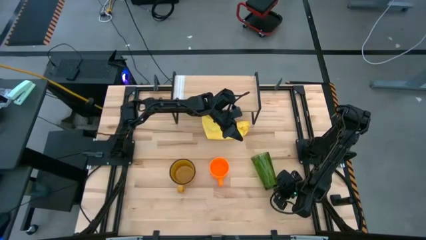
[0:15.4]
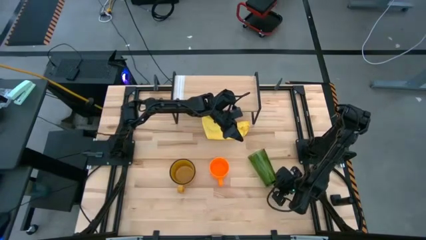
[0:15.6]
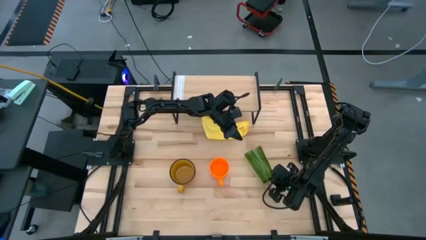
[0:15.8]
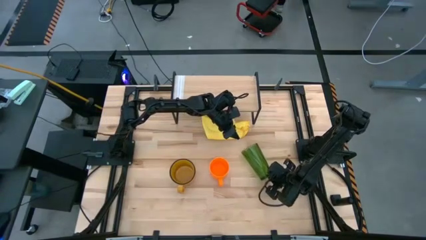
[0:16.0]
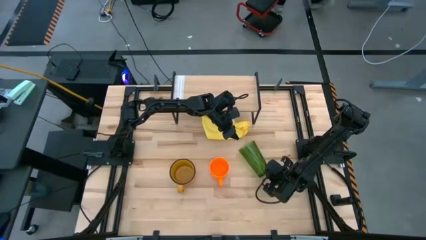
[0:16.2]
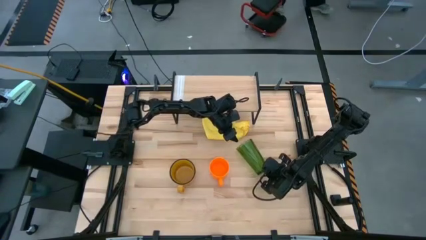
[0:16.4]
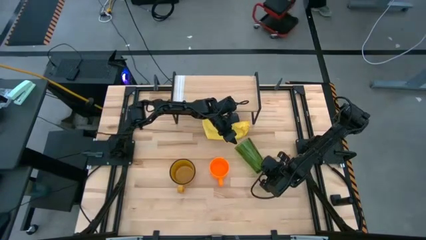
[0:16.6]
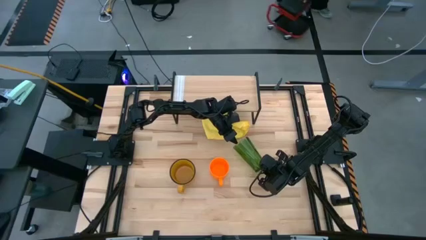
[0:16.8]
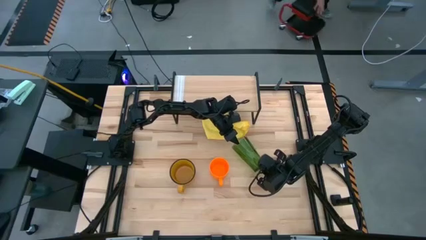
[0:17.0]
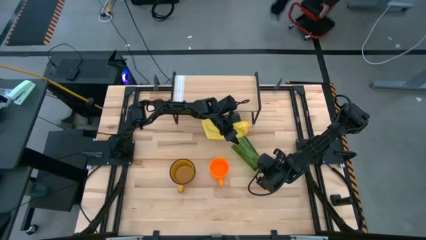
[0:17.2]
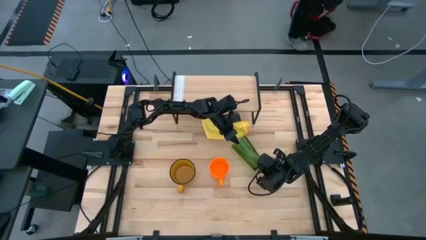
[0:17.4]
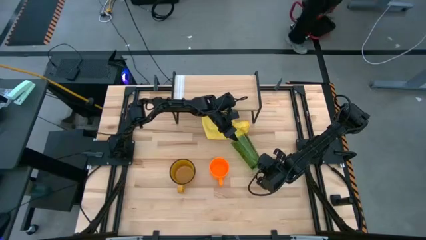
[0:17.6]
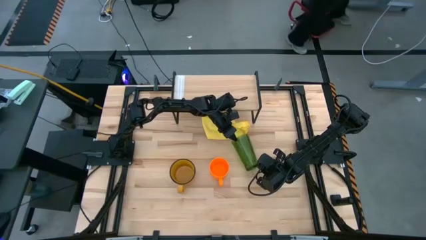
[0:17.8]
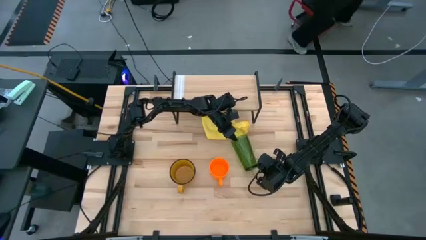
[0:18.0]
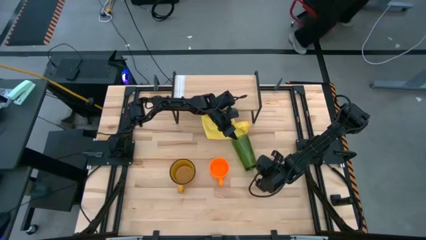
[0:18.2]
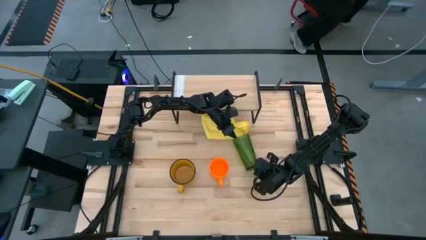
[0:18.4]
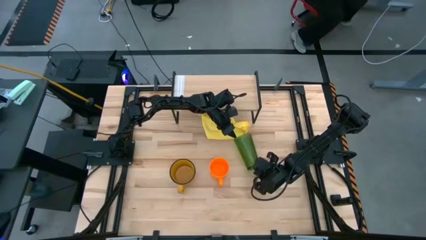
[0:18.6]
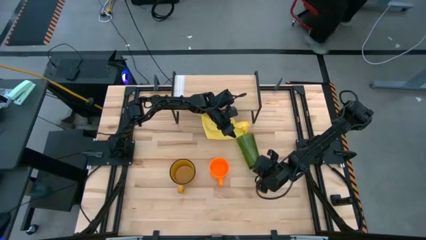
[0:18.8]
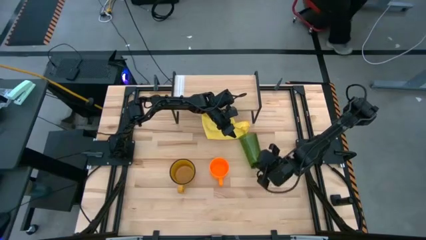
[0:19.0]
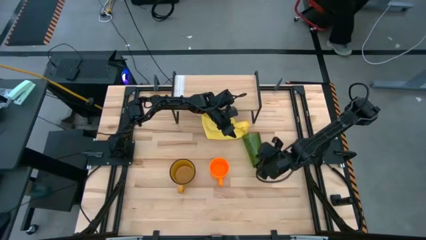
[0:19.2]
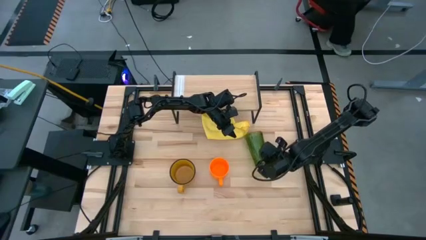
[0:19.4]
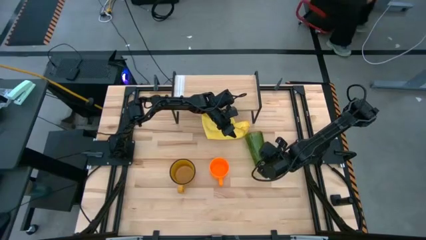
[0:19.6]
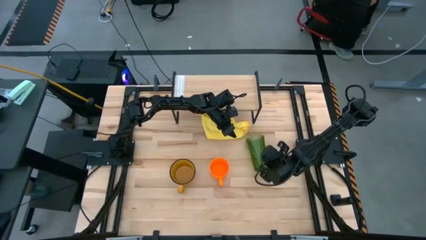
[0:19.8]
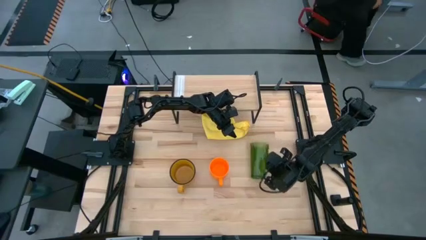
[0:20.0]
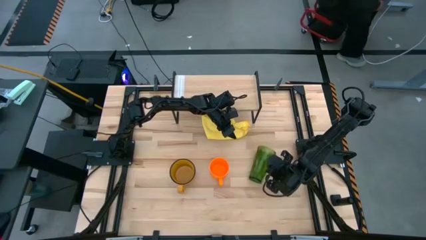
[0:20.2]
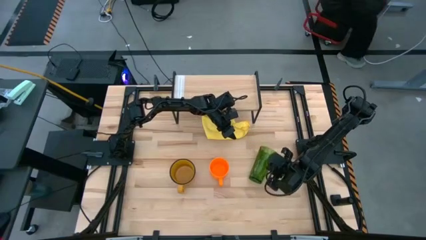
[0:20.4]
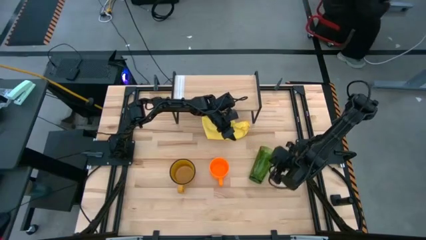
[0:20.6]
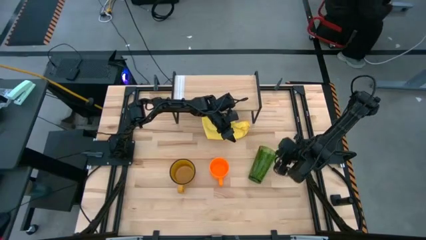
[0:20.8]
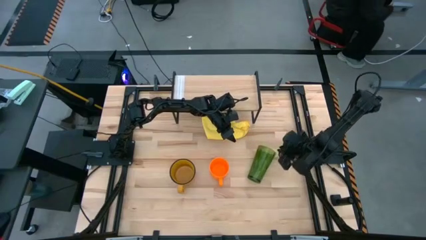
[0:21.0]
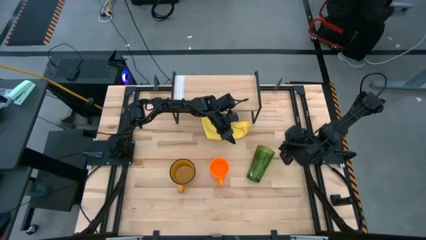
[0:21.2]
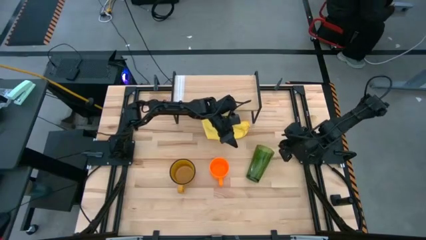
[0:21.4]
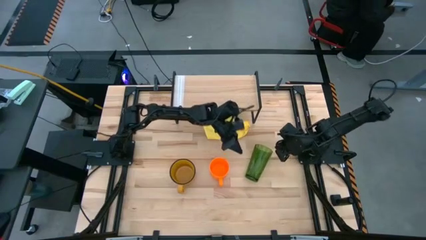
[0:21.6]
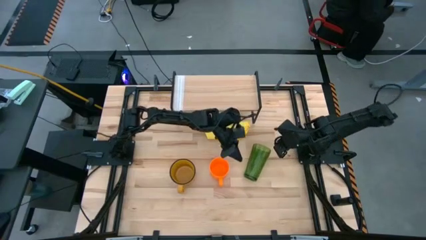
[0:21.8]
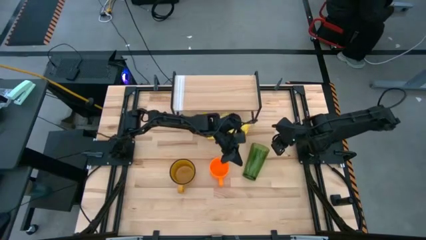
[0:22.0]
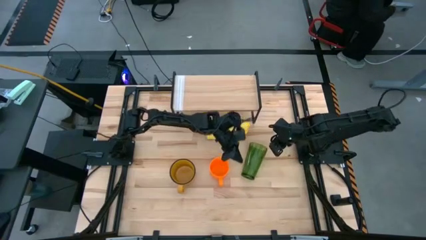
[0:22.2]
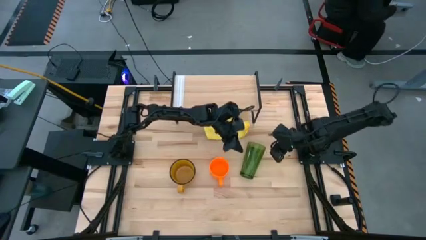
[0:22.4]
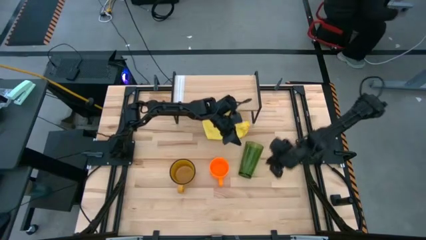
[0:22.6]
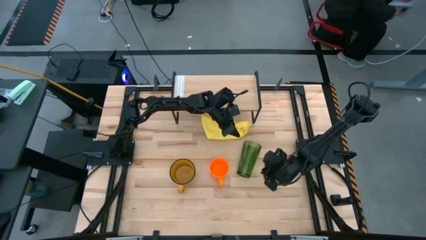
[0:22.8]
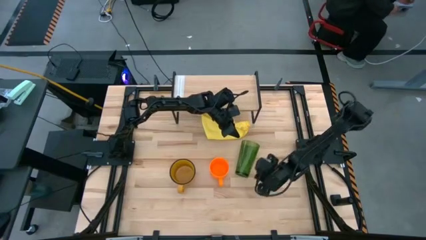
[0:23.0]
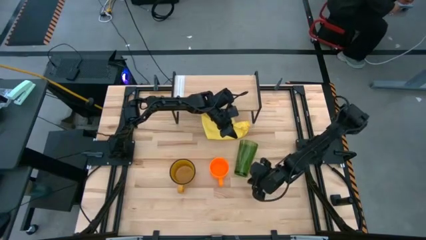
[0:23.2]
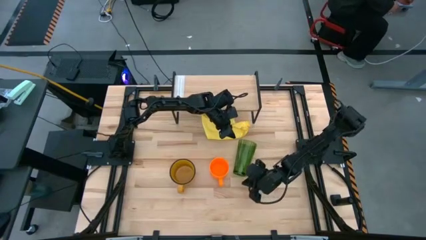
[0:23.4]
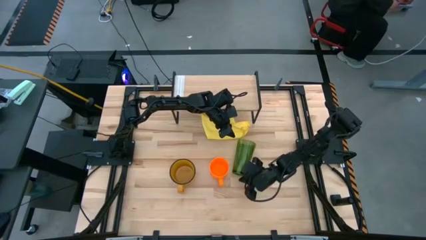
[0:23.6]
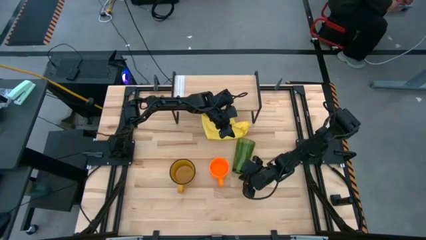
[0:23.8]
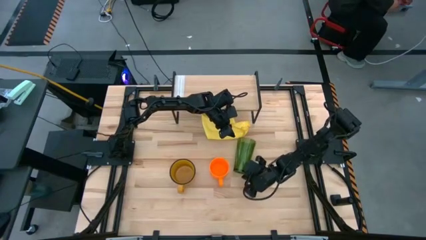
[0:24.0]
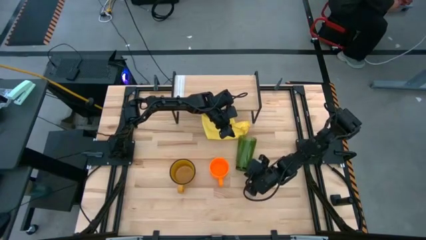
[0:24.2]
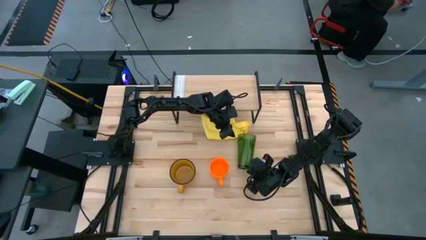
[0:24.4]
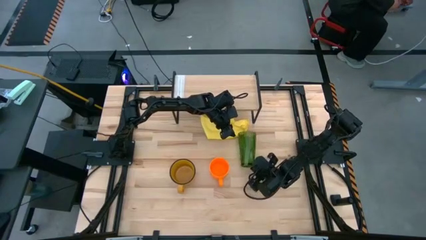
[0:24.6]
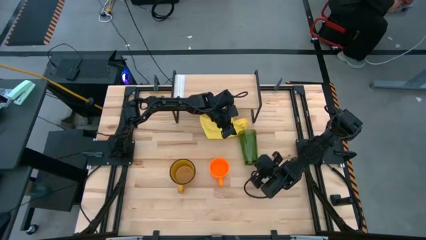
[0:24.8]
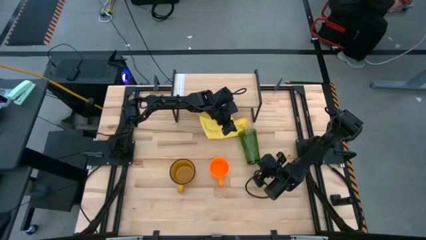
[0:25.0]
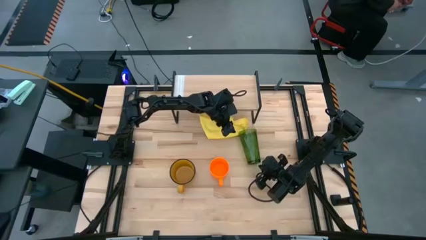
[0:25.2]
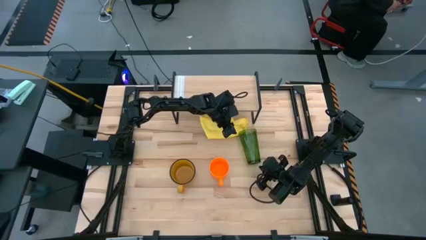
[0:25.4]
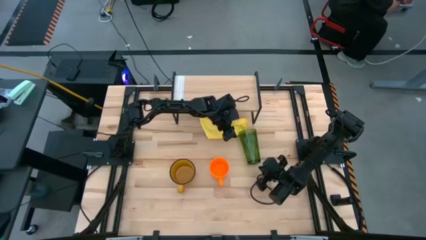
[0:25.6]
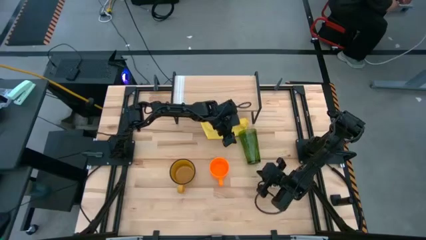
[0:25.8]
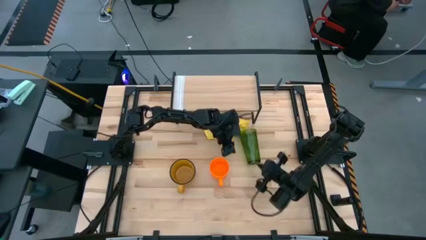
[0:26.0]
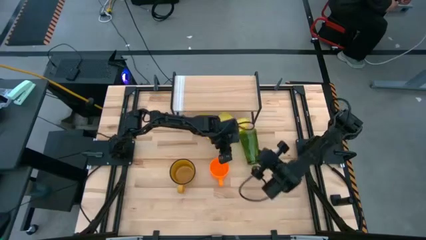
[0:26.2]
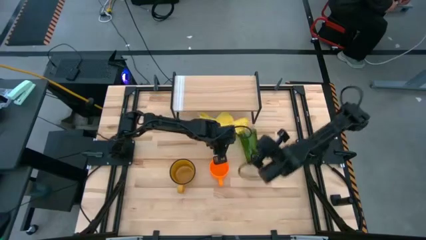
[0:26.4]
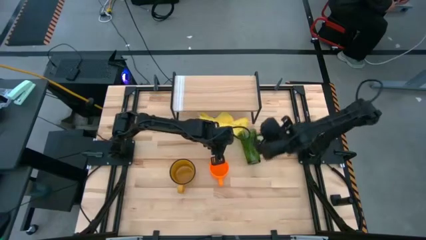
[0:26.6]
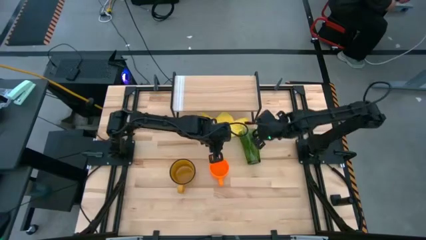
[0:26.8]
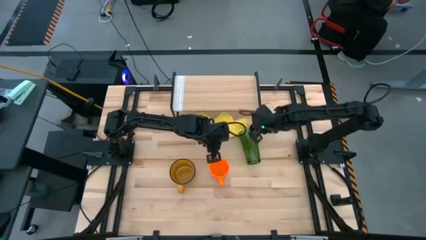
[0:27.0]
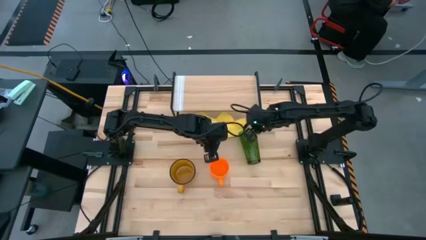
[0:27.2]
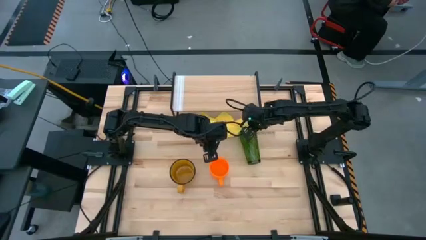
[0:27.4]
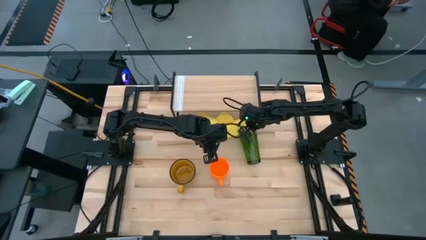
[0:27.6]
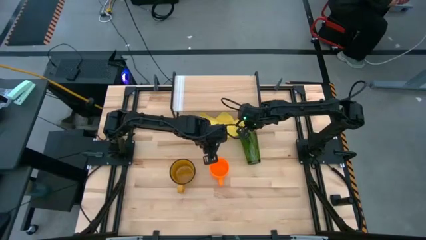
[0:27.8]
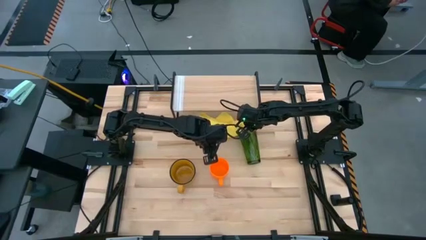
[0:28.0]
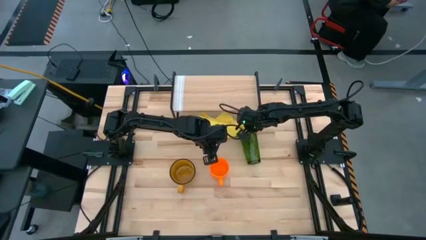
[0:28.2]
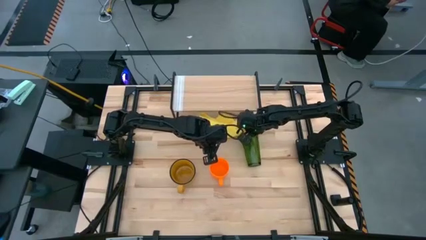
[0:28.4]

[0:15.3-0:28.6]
Task: Stack small to large cups/mugs on shelf
Put the green cup on the shelf
